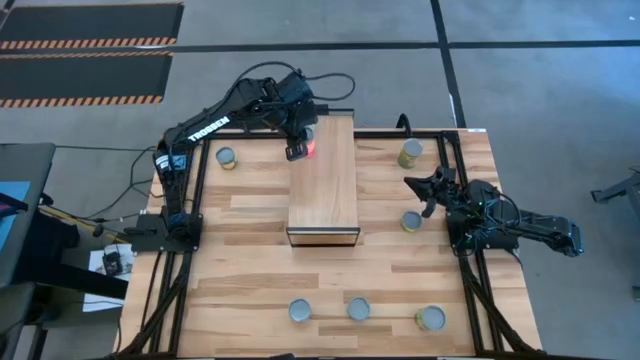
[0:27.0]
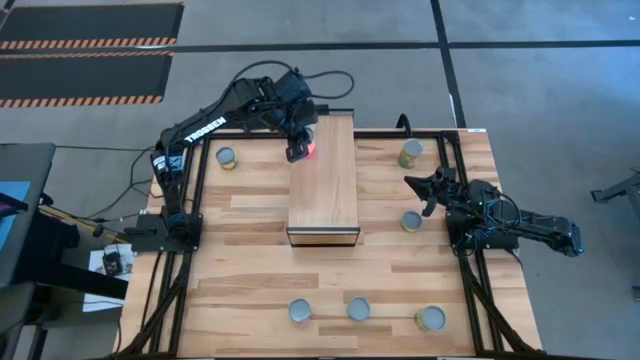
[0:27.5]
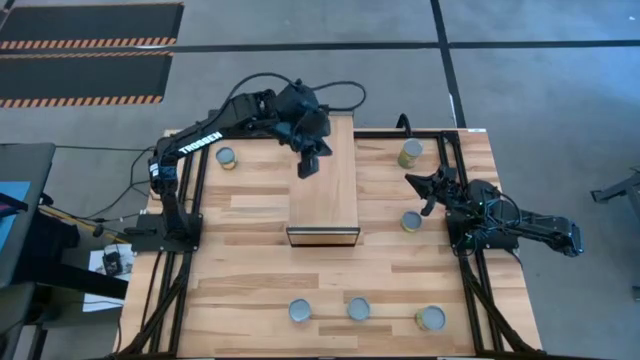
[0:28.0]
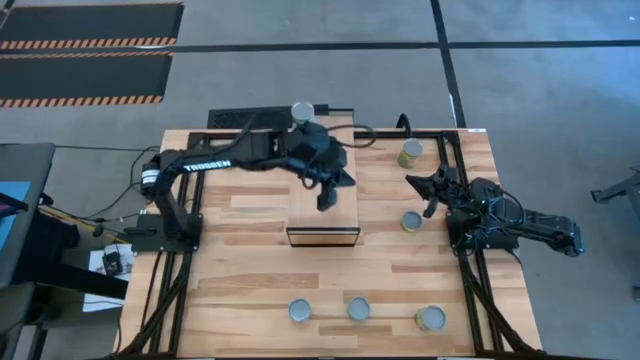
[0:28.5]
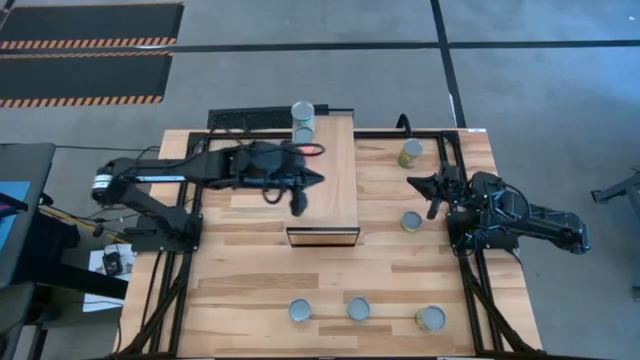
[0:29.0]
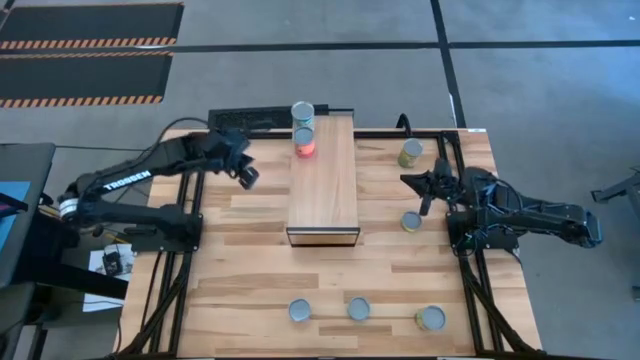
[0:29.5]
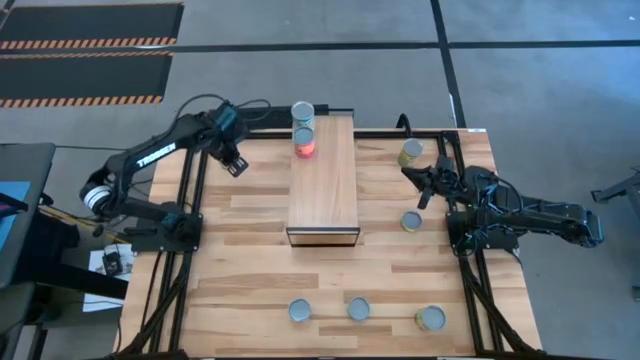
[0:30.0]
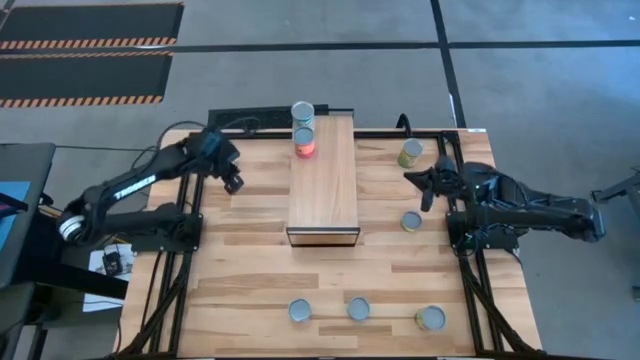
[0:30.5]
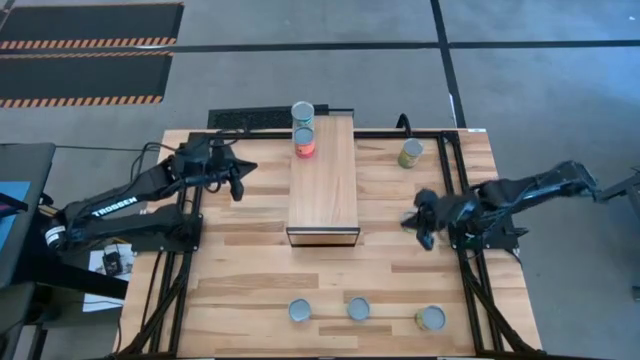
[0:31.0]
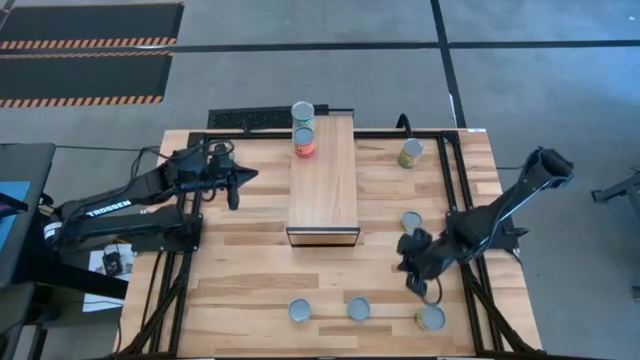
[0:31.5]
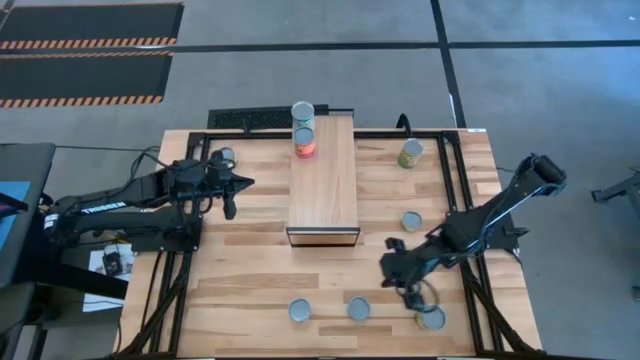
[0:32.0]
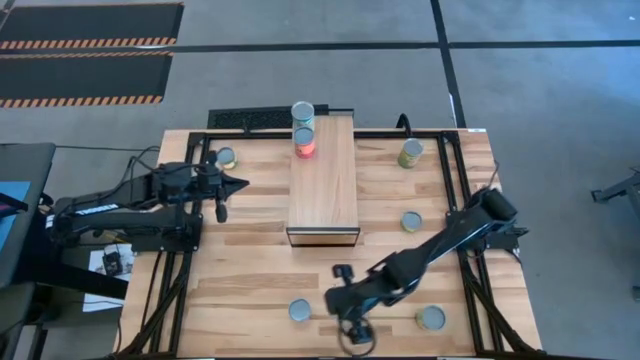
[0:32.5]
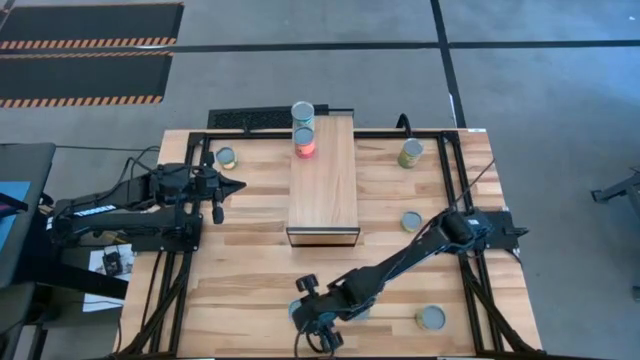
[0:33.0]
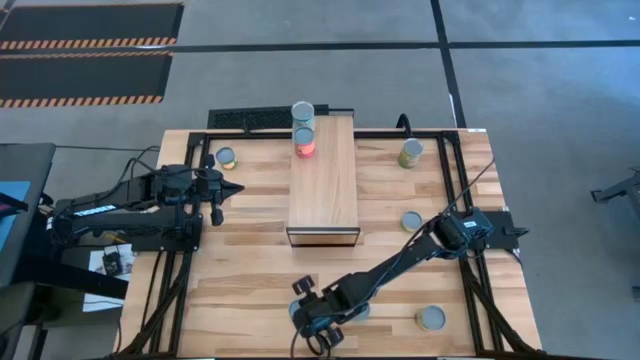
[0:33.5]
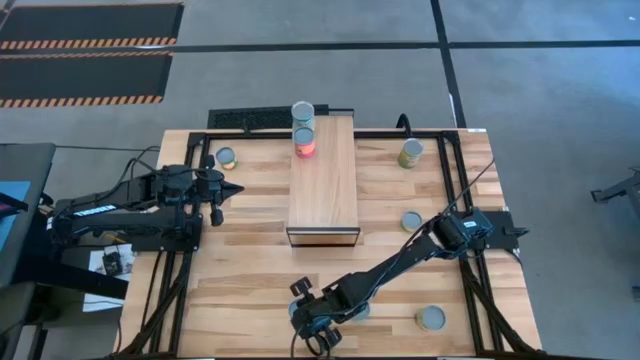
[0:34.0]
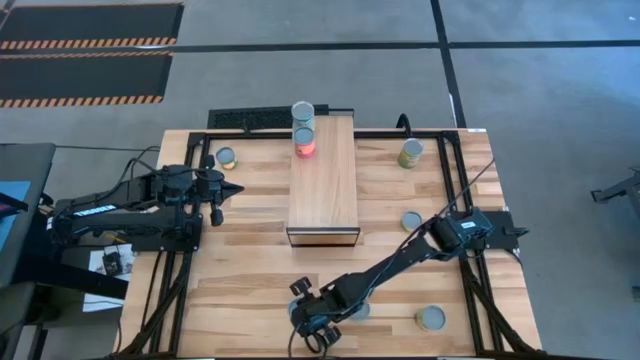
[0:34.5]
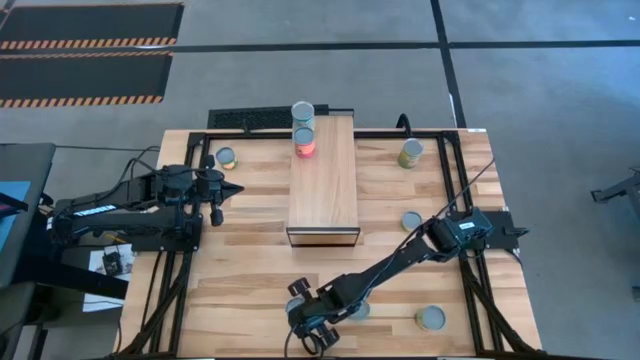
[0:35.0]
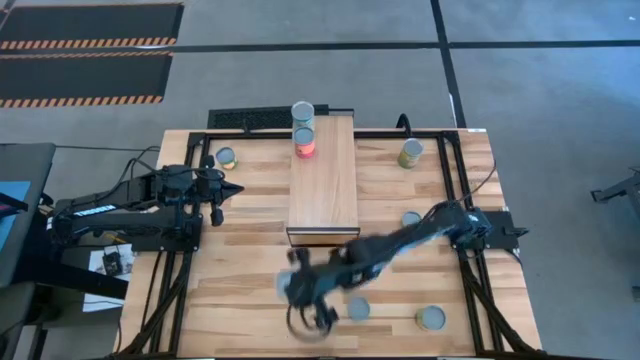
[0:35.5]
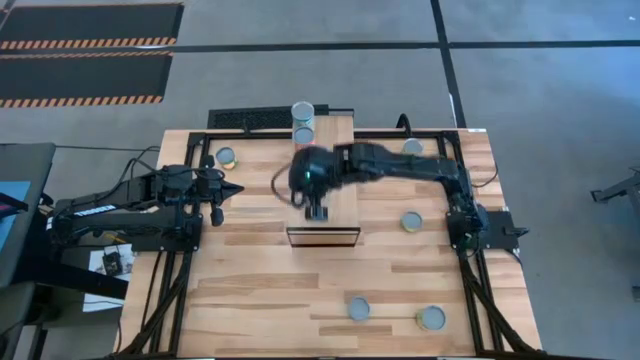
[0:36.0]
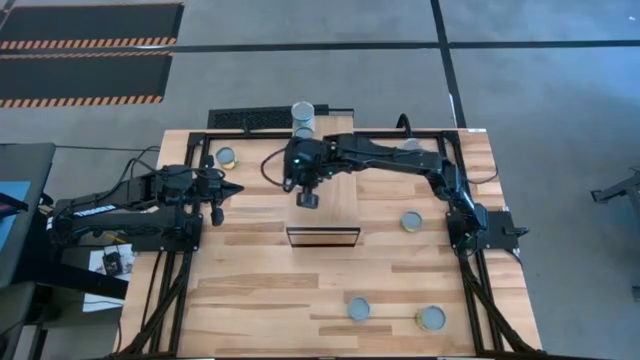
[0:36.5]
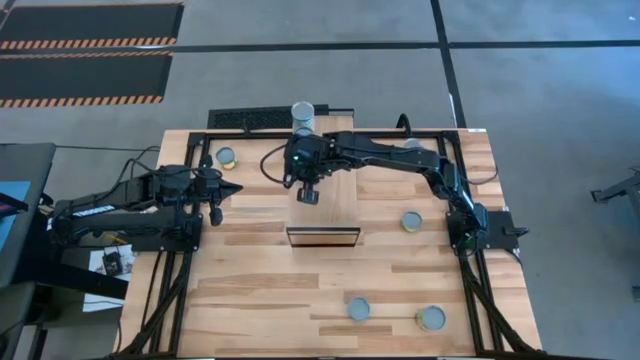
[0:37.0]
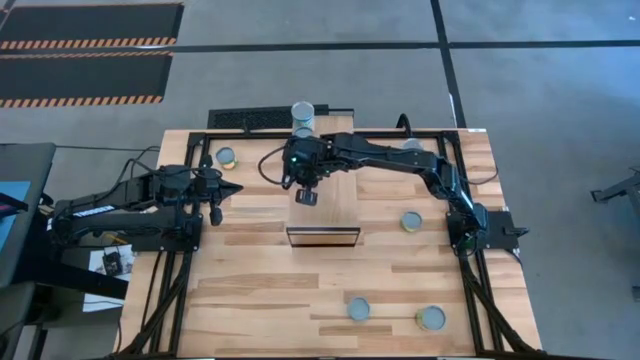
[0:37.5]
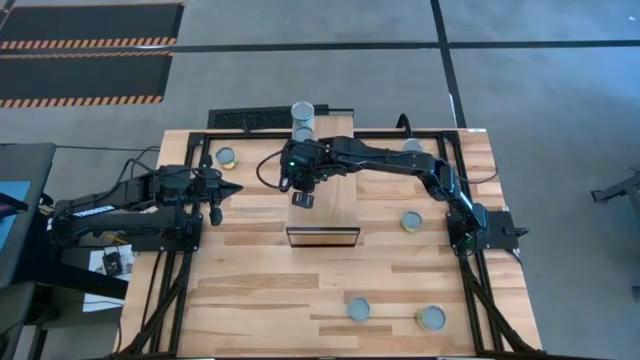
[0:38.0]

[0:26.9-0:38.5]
Task: Pick and place cans onto a shelf
Put the canned diced tomatoes on the shelf

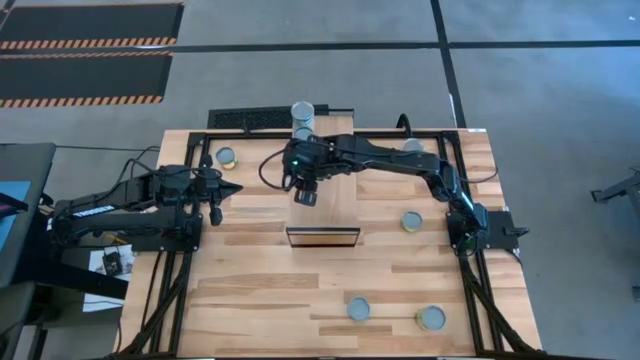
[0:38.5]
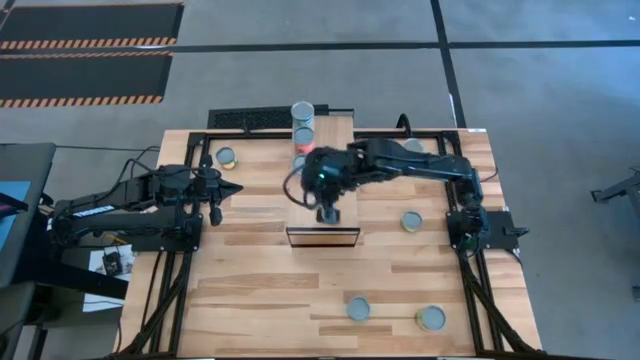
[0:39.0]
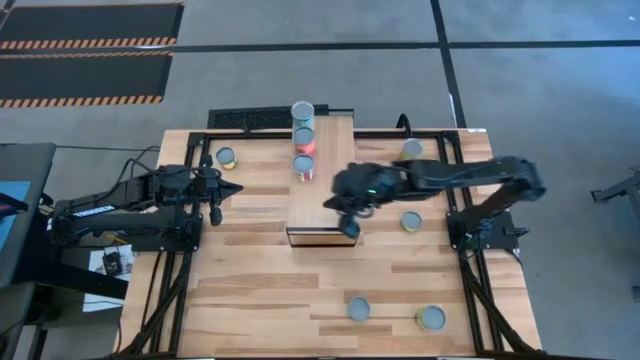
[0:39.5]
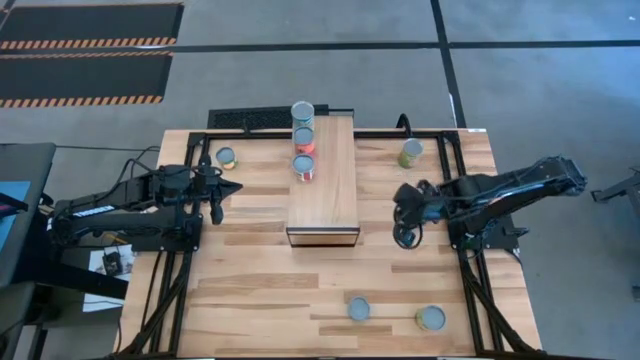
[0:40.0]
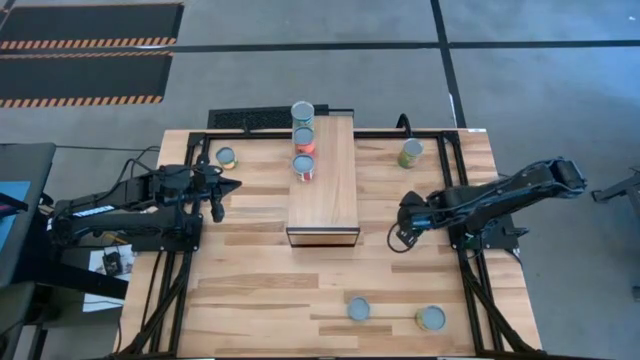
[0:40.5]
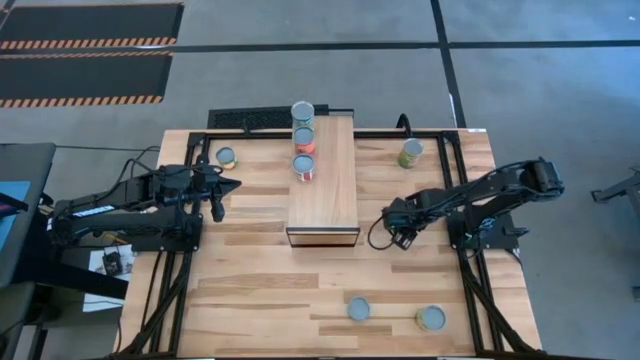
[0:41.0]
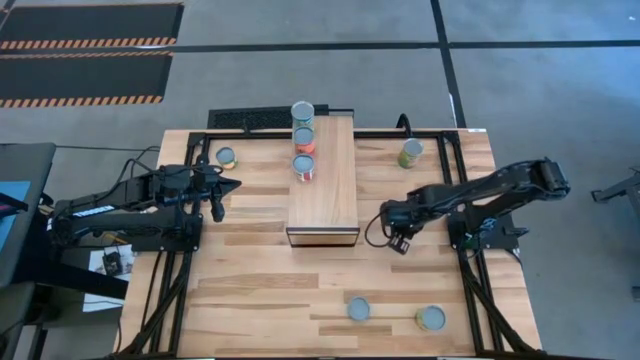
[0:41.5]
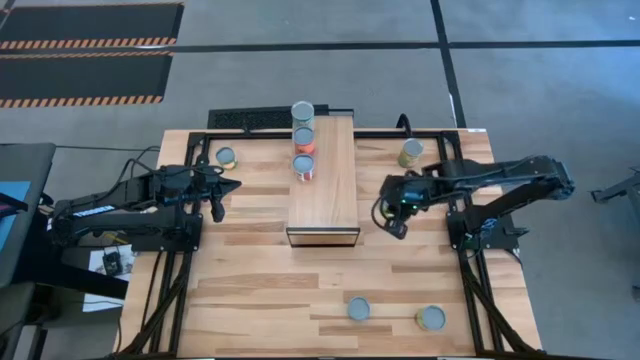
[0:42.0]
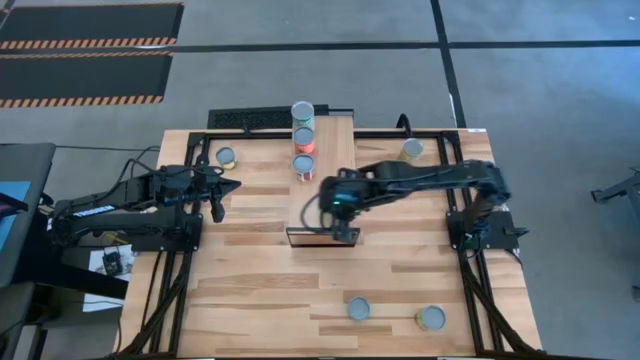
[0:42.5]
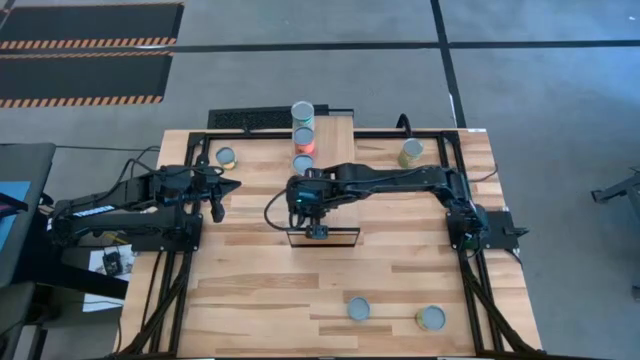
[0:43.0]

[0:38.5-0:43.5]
Put the canned mushroom on the shelf

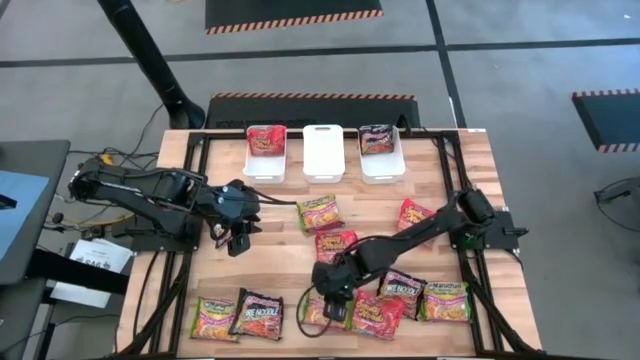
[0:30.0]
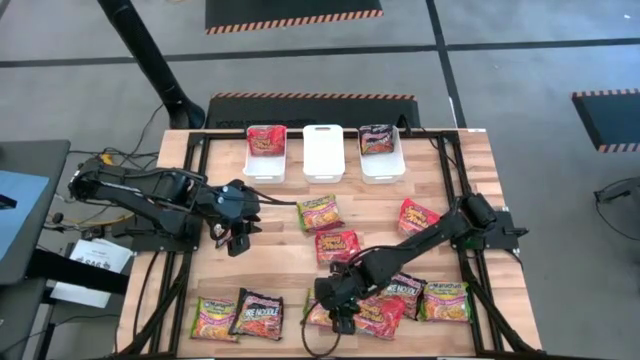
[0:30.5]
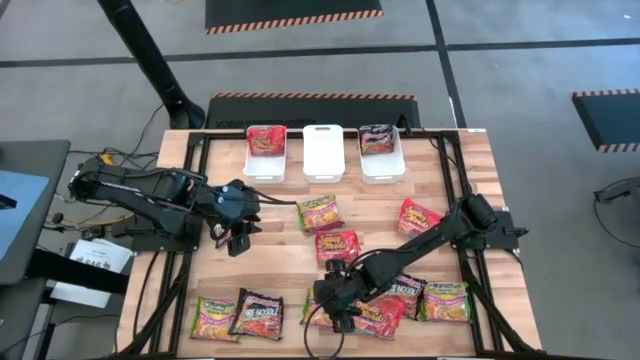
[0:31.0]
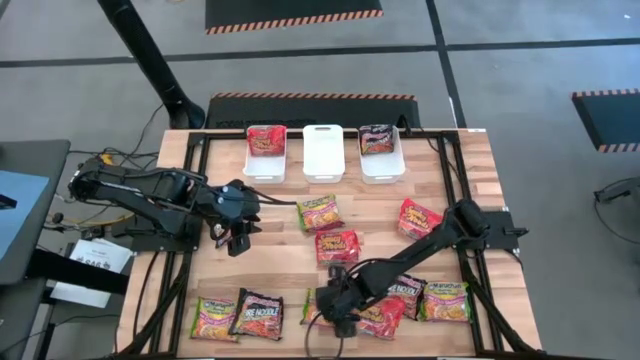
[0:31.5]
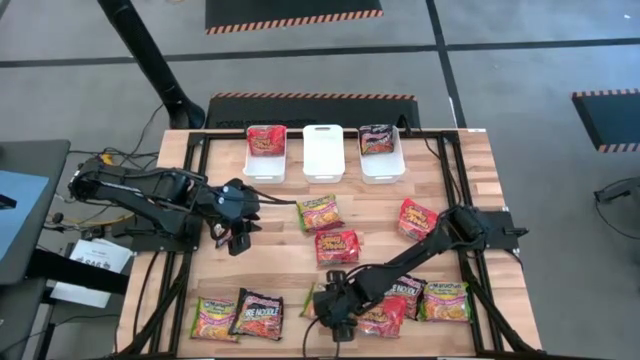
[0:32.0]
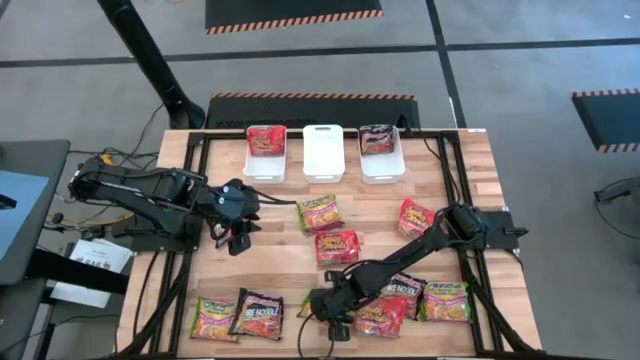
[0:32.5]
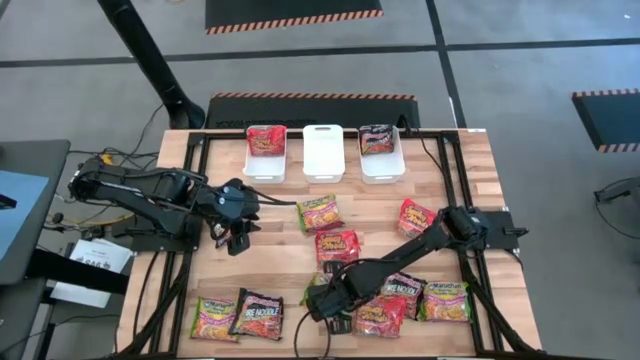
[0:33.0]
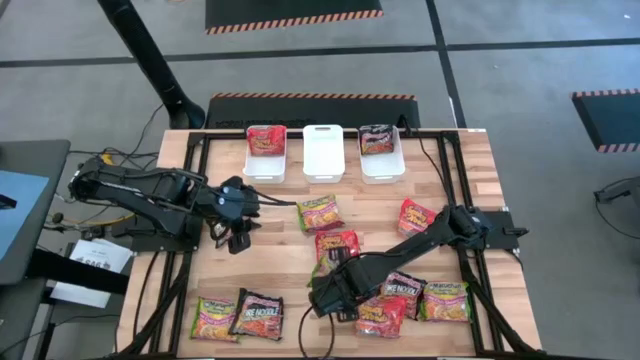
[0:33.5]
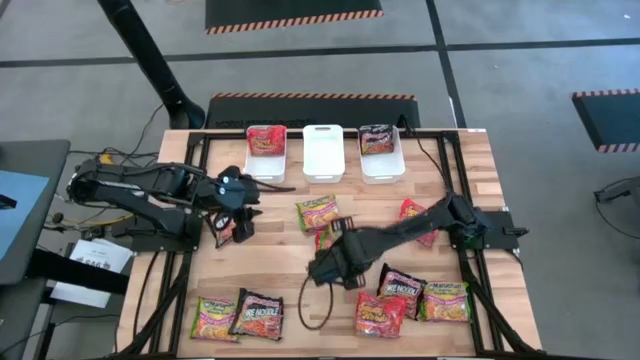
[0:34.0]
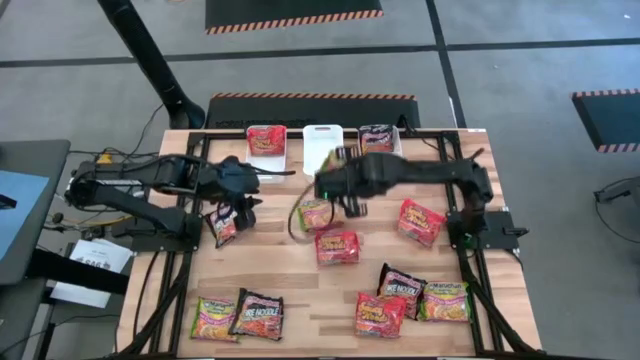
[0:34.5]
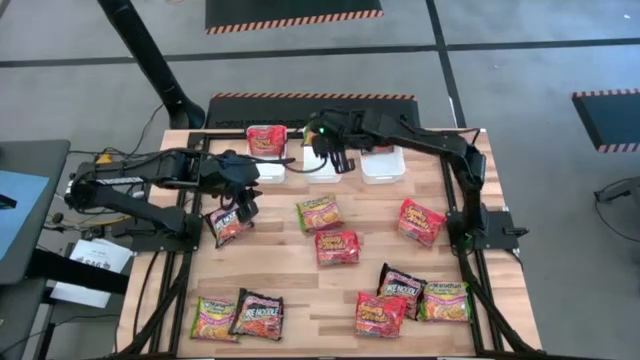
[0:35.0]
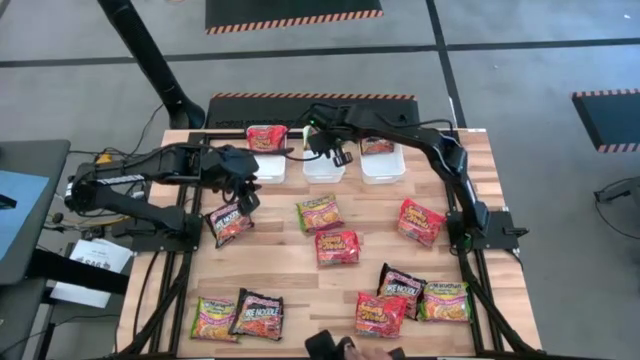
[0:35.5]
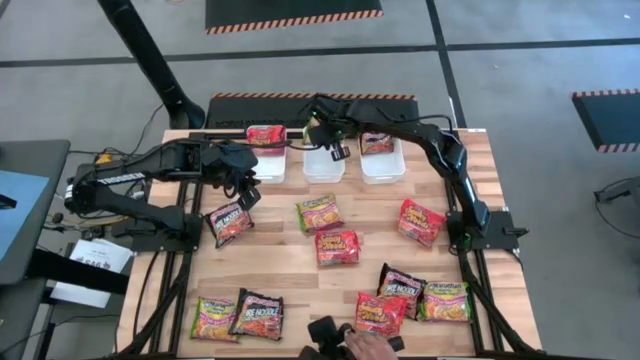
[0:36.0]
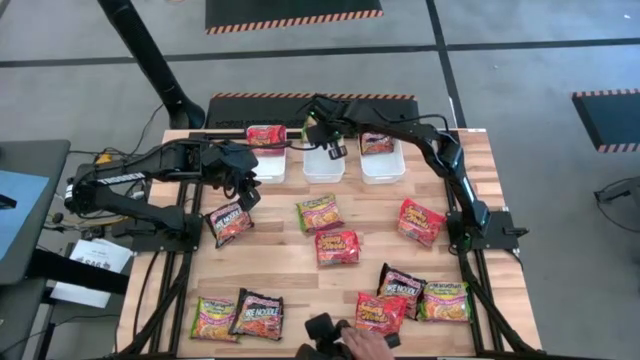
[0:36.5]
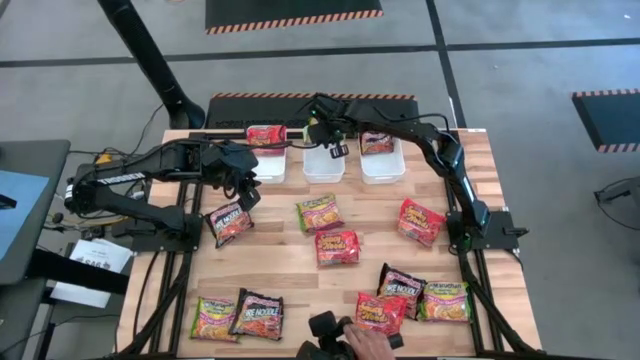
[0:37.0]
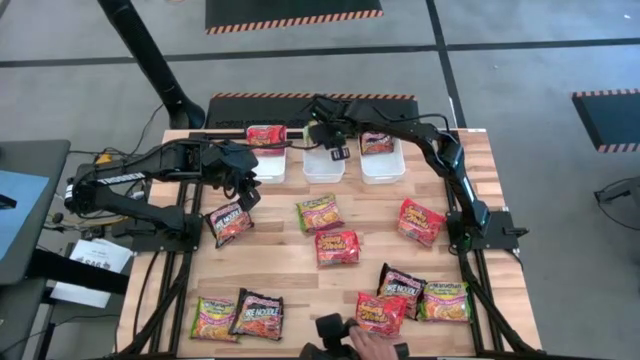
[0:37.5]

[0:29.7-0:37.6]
Task: Sort Maruchan noodles
Put the green noodle pack into the middle white bin
